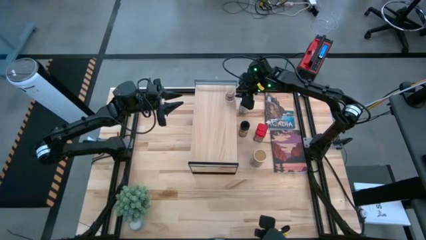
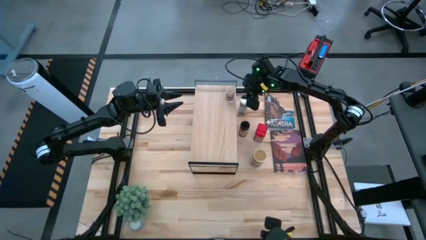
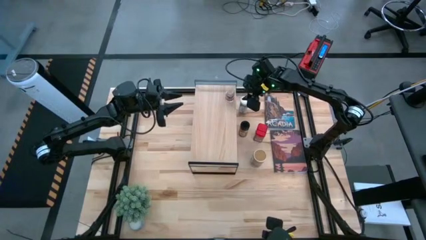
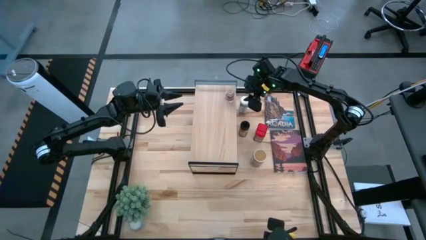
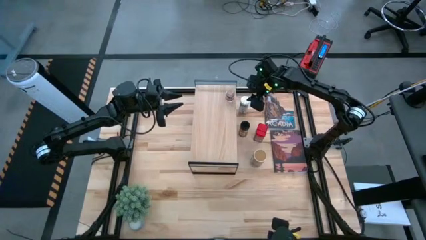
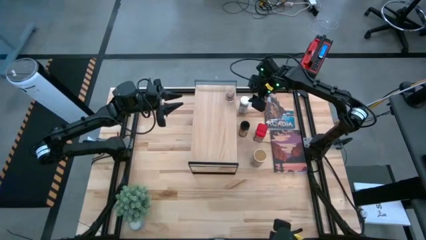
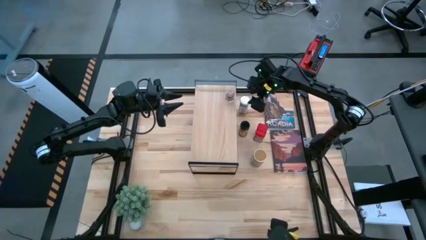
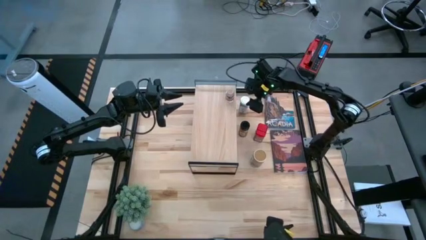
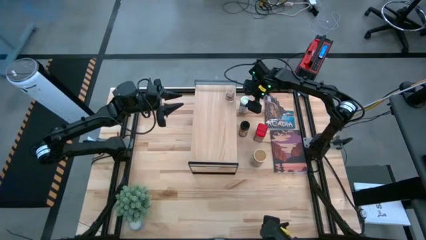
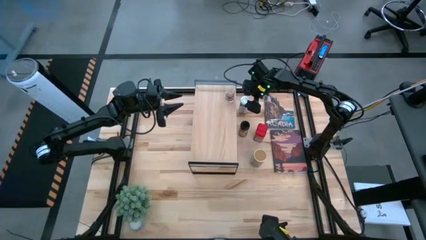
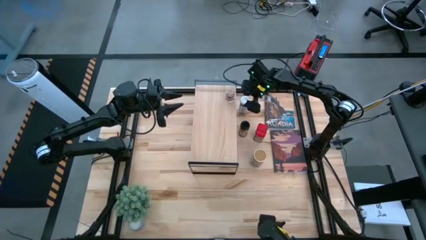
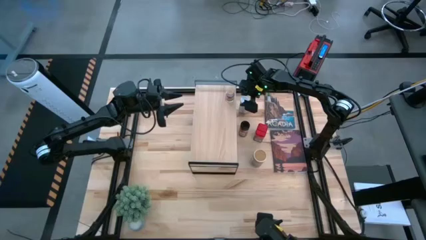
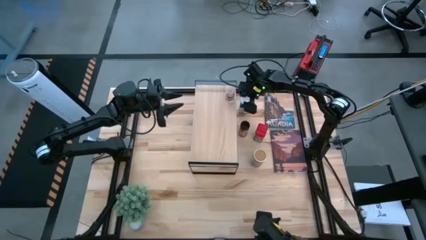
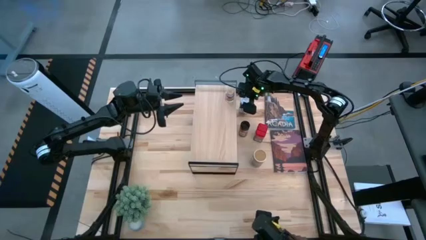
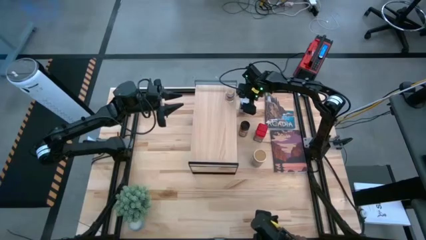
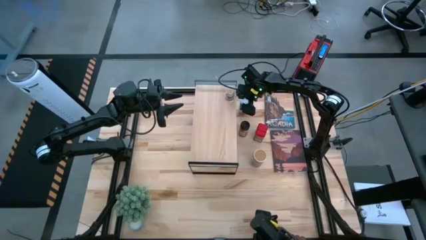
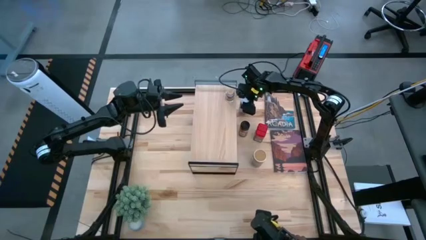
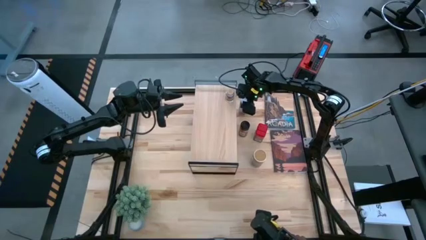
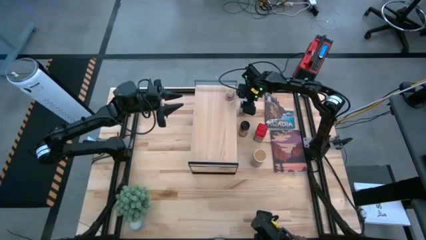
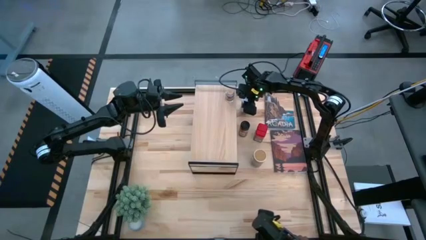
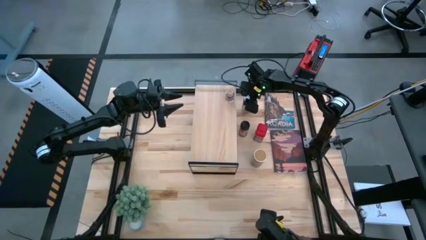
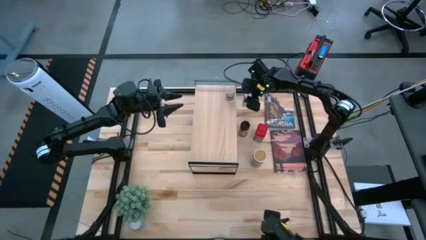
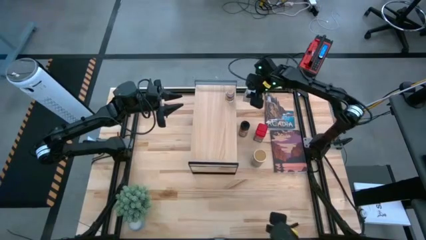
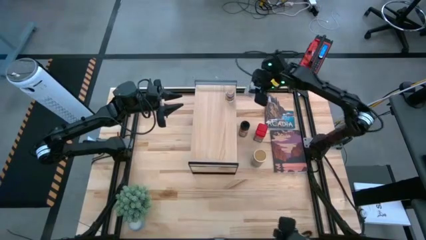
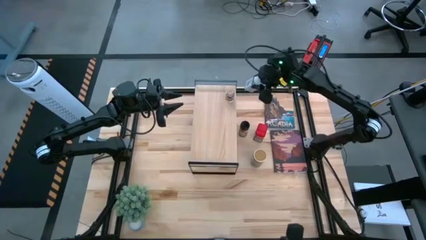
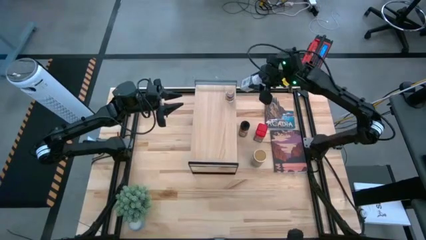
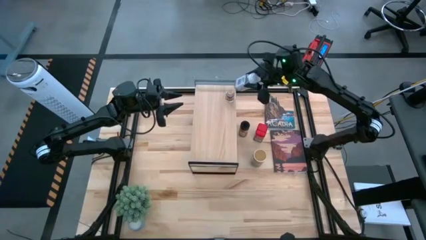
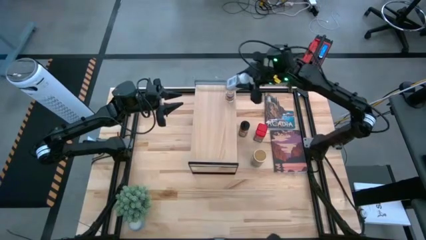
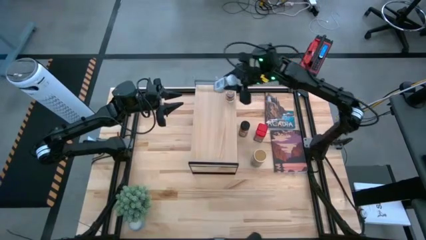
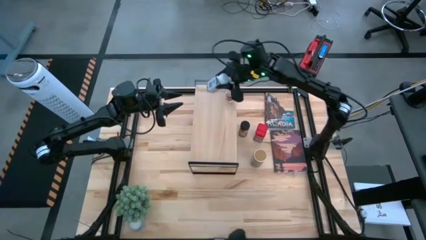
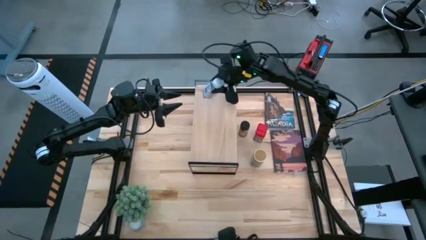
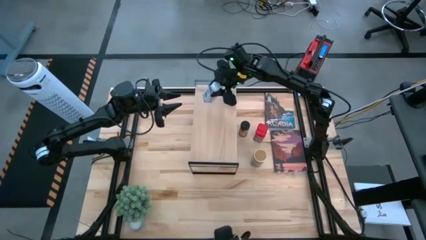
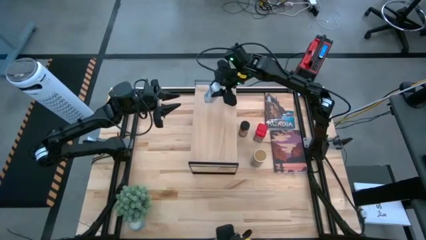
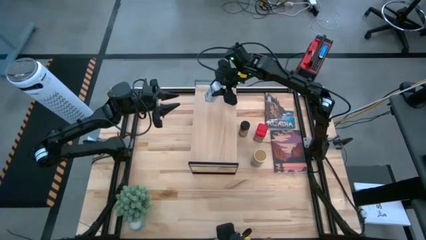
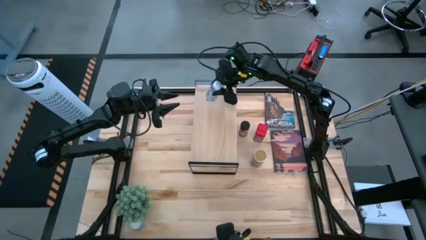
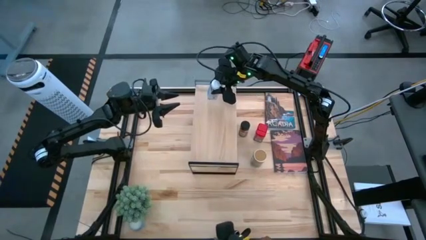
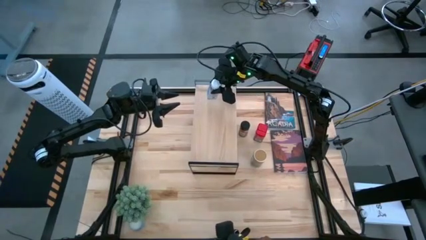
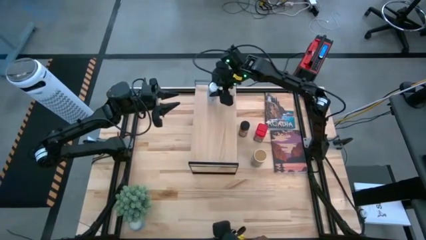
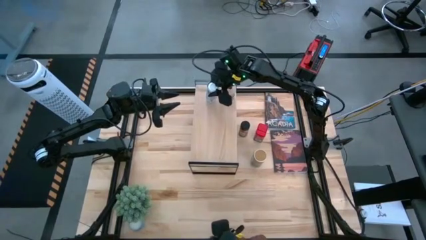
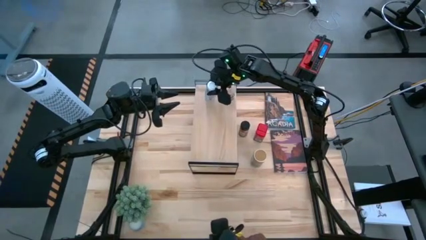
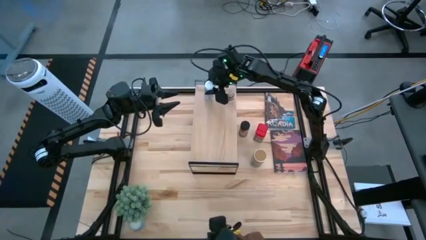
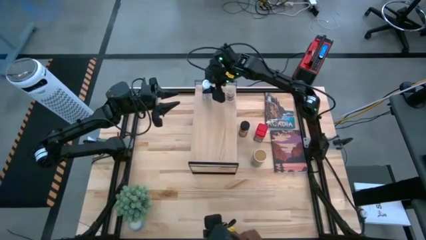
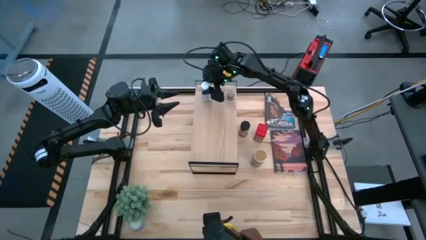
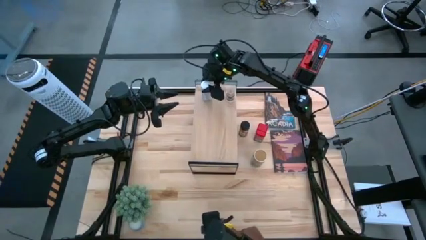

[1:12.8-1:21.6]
Task: Shelf spices
Put the white seasoning bottle on the shelf

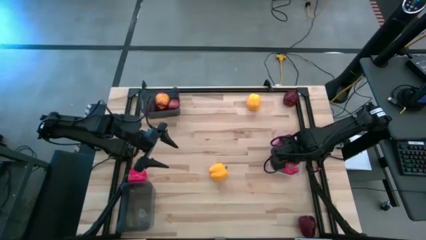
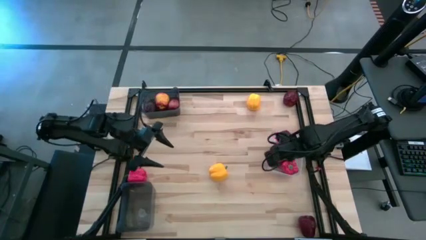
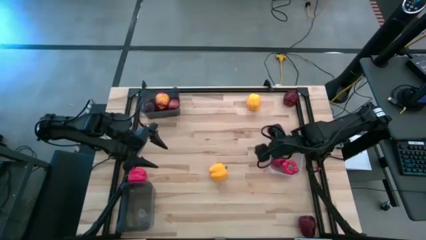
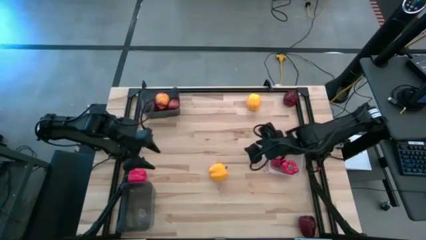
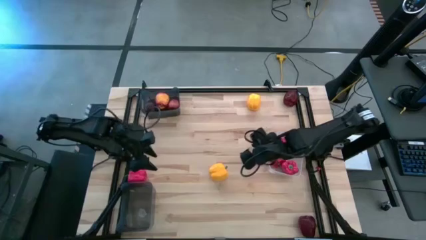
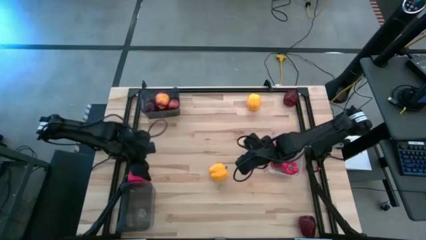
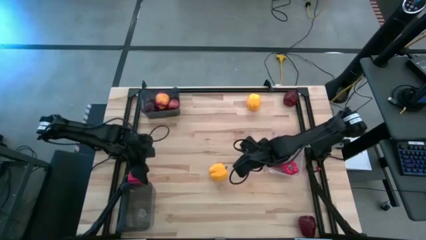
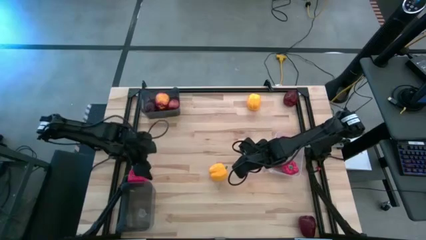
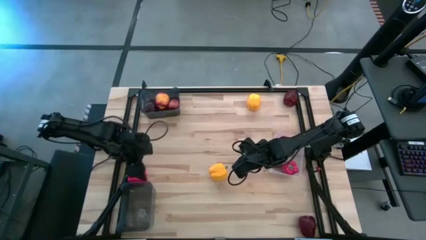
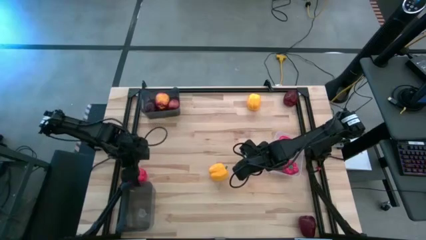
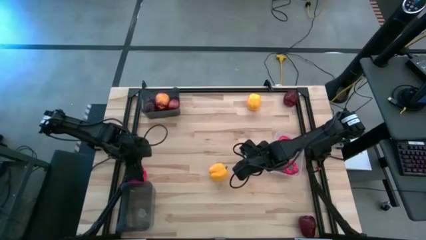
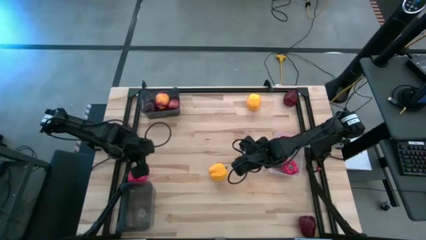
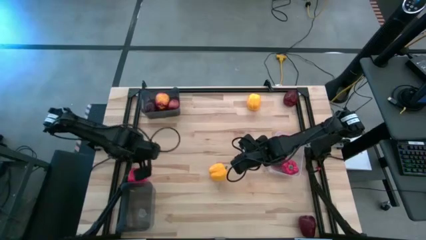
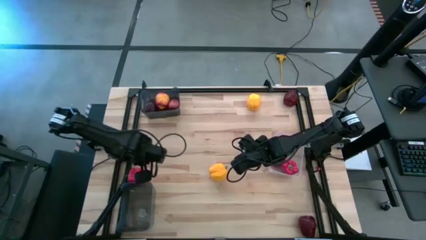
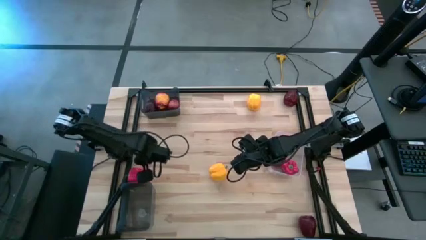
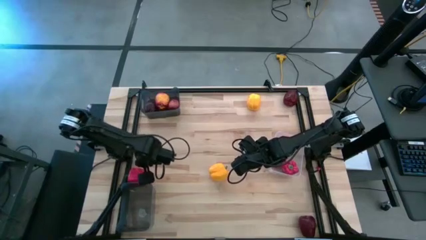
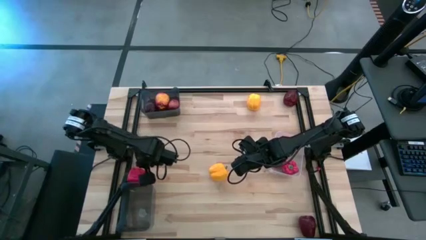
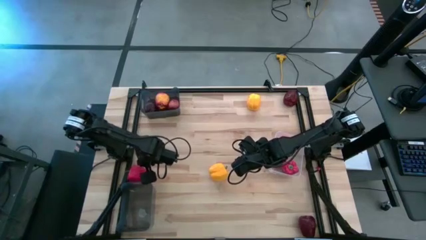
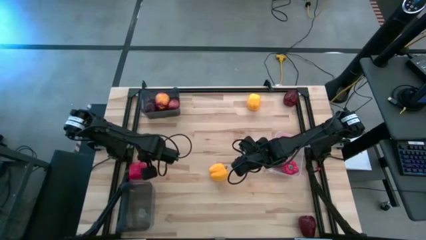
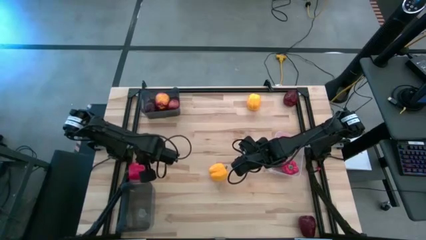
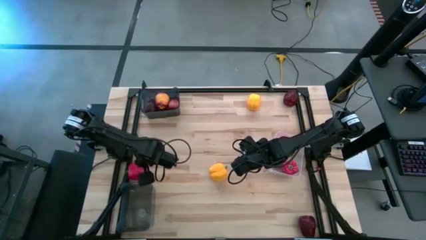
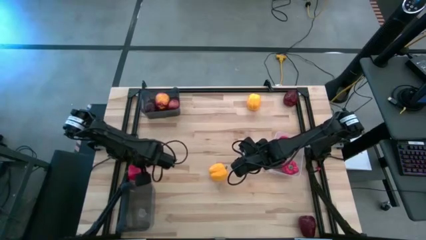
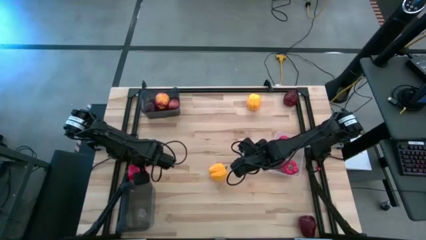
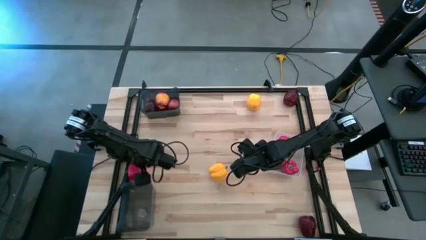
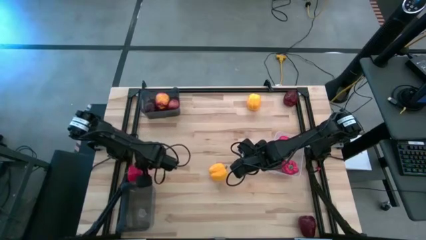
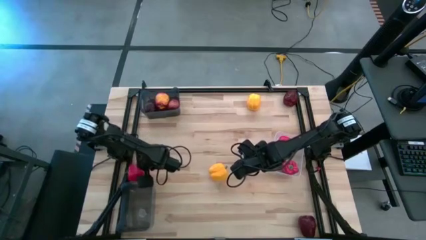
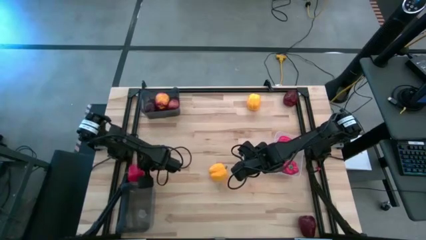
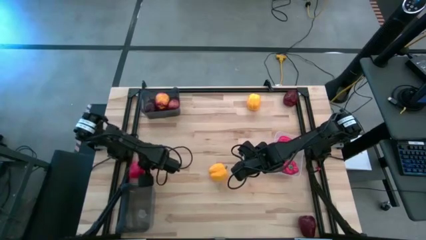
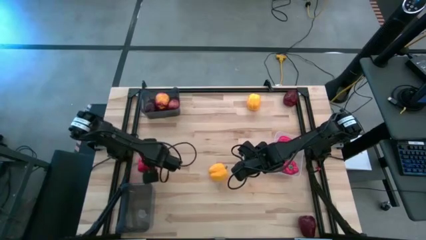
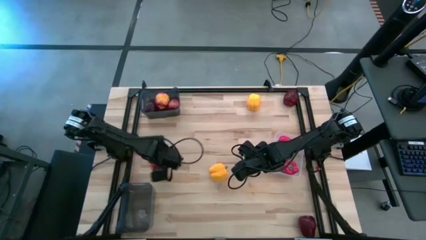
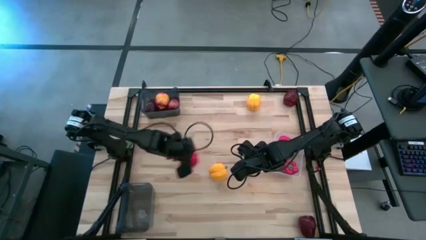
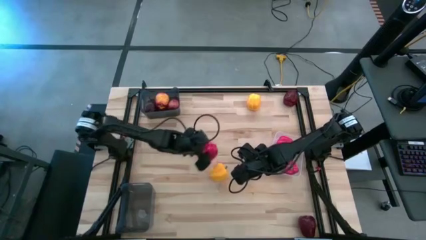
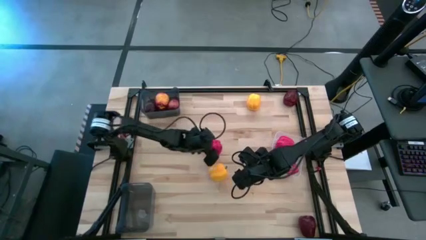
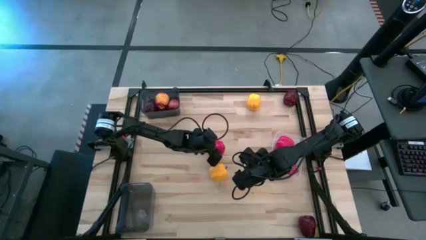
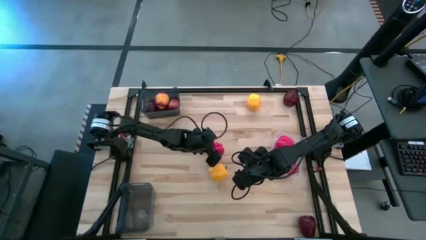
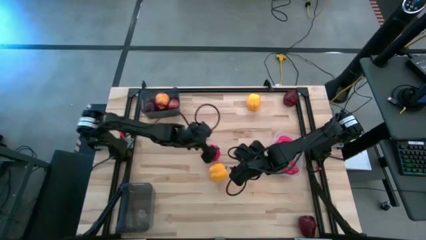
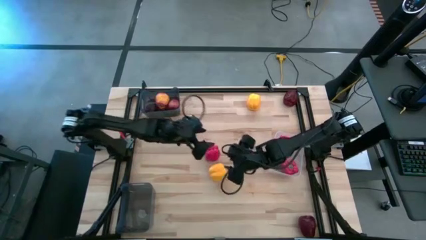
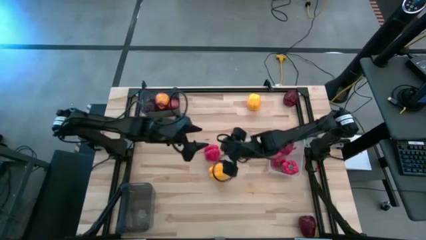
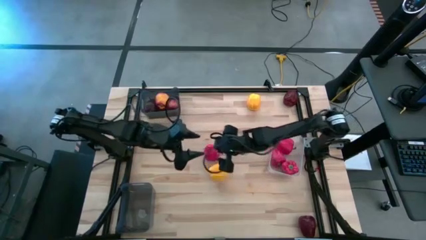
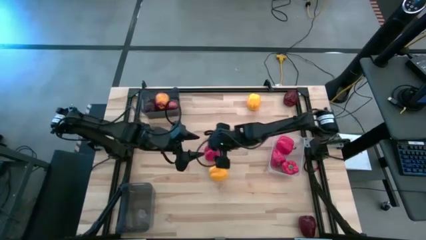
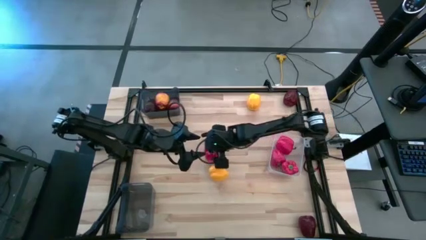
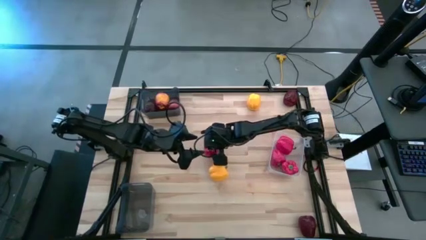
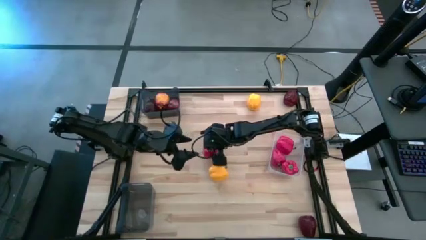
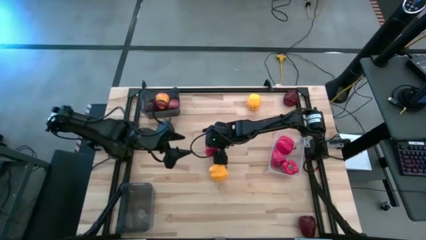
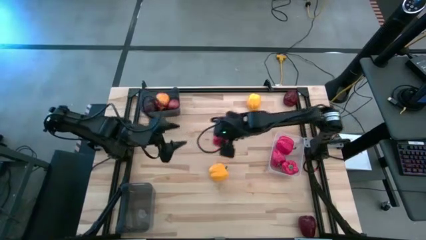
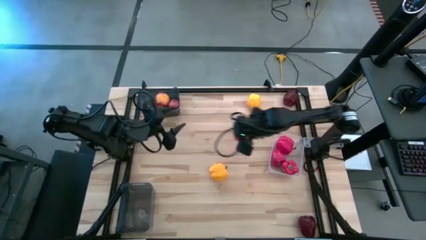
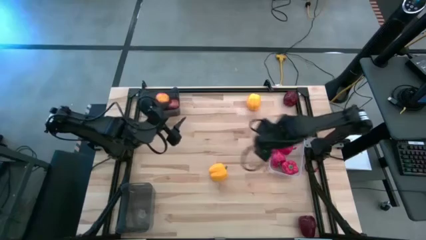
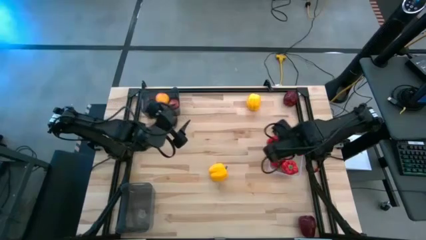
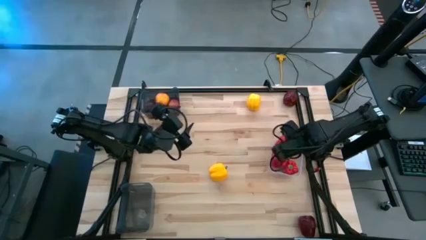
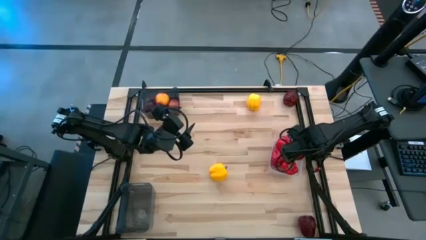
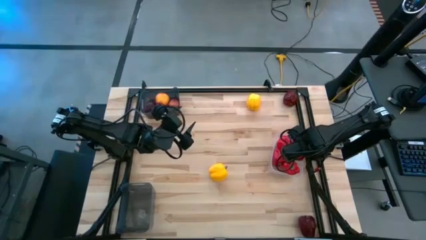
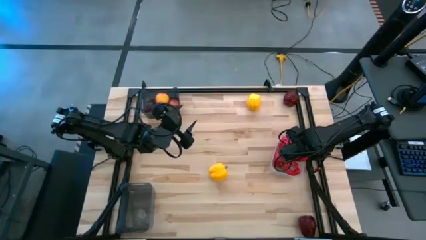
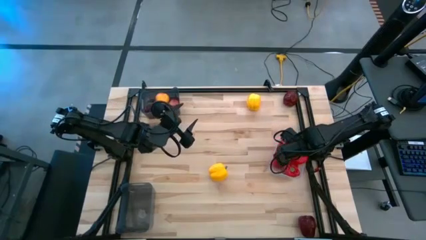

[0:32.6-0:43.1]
Task: Sort produce into baskets
Put the red bell pepper into the transparent bin
